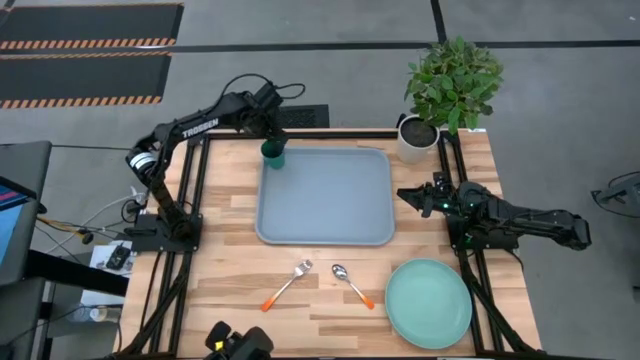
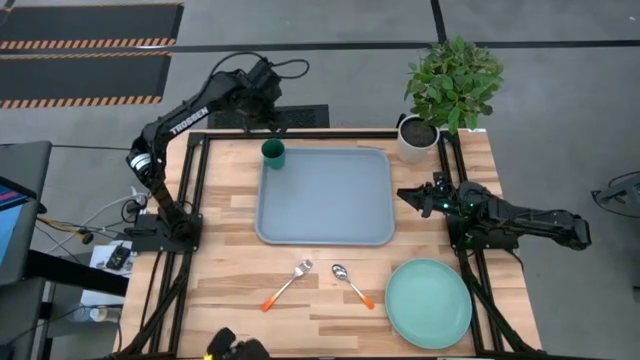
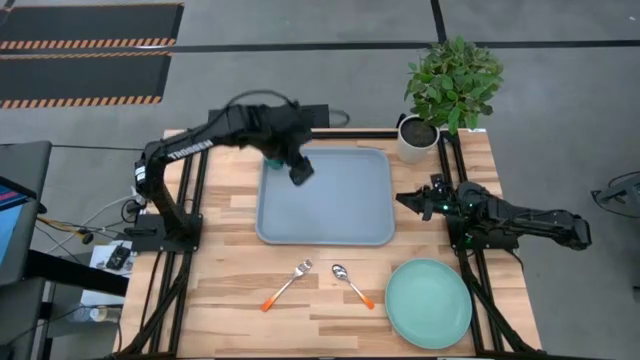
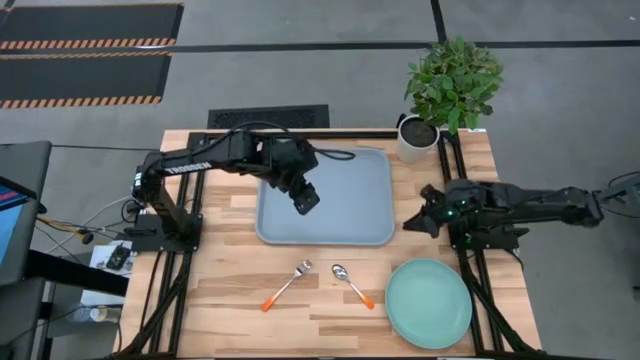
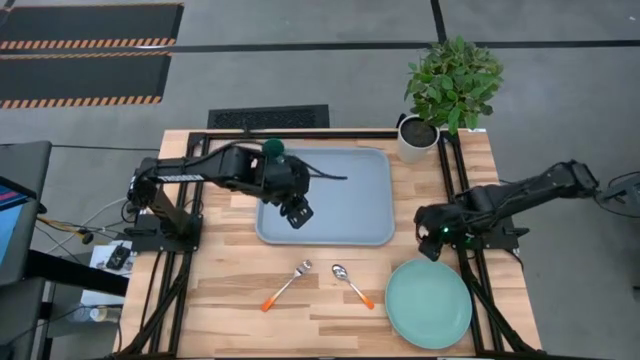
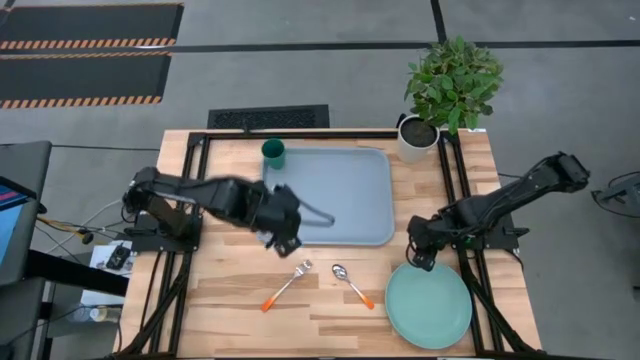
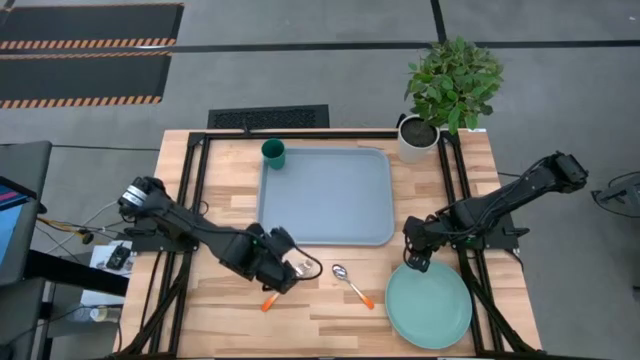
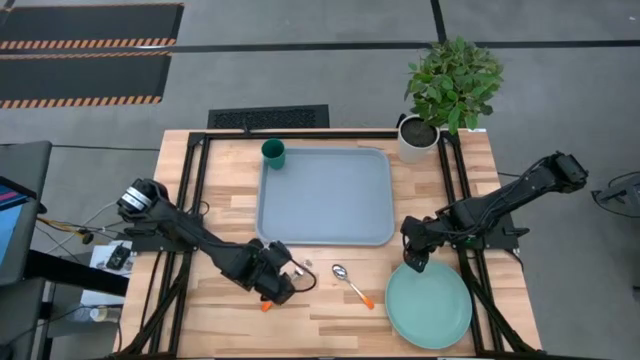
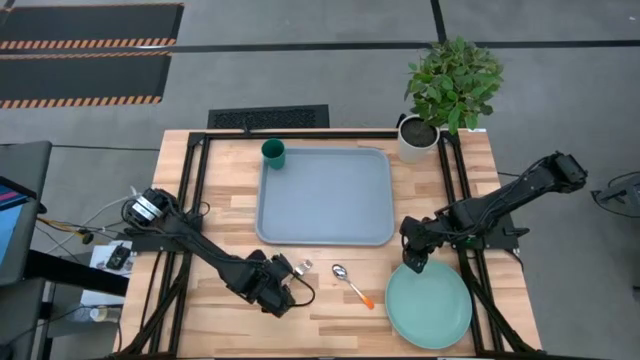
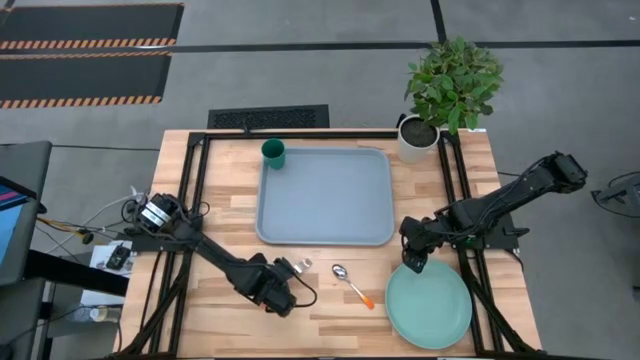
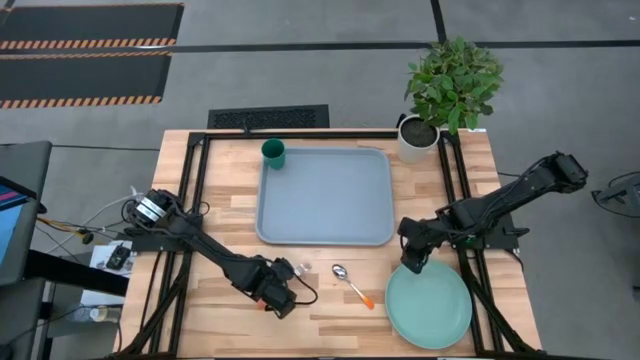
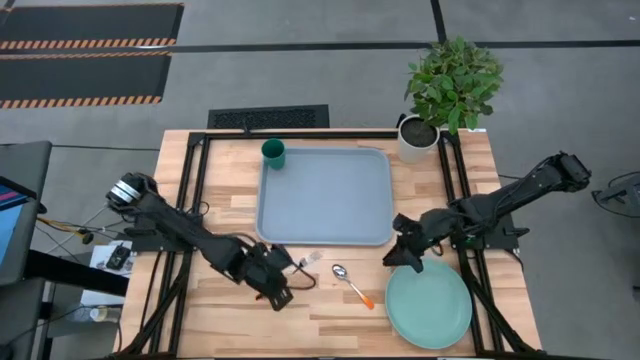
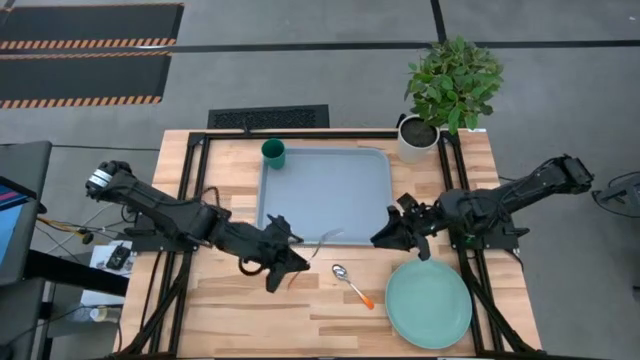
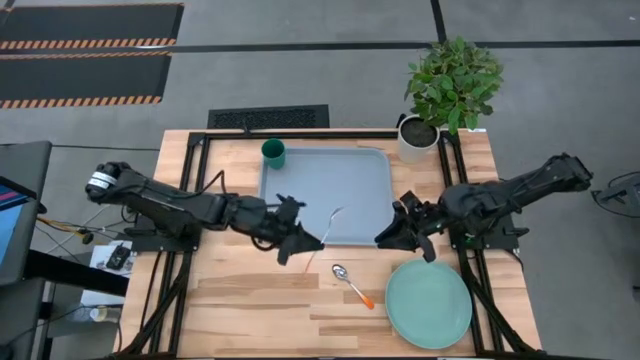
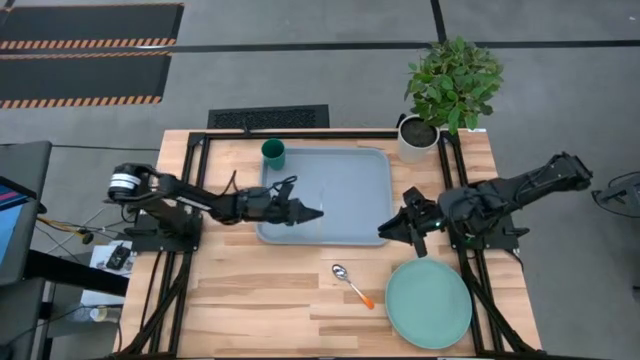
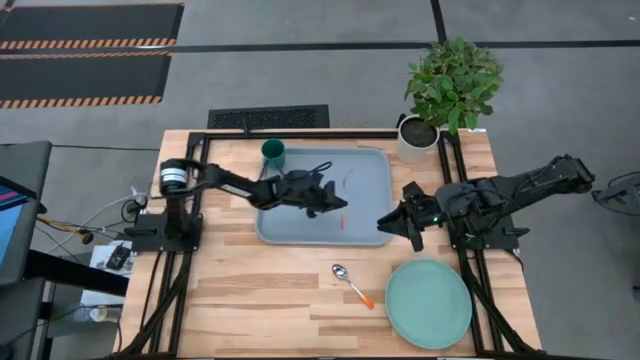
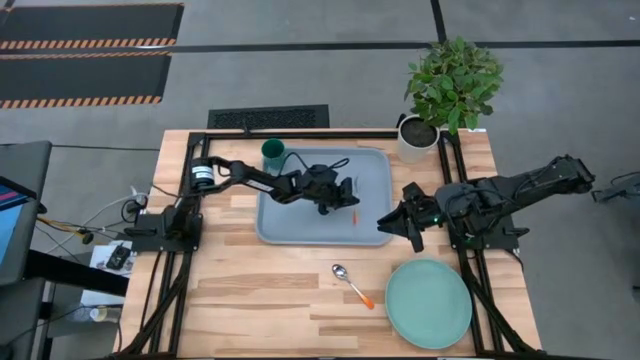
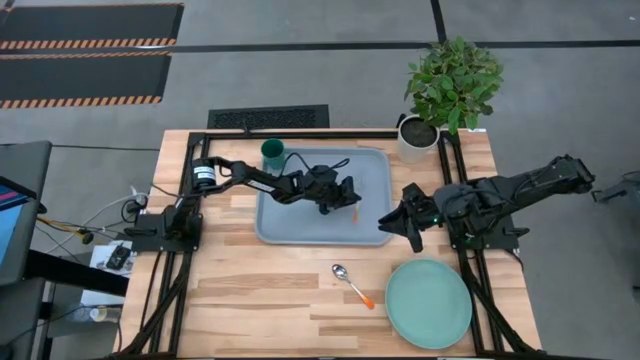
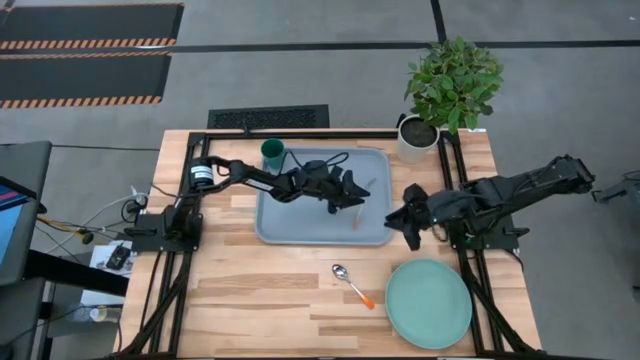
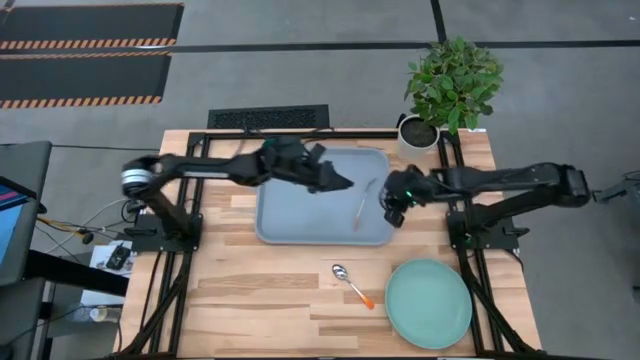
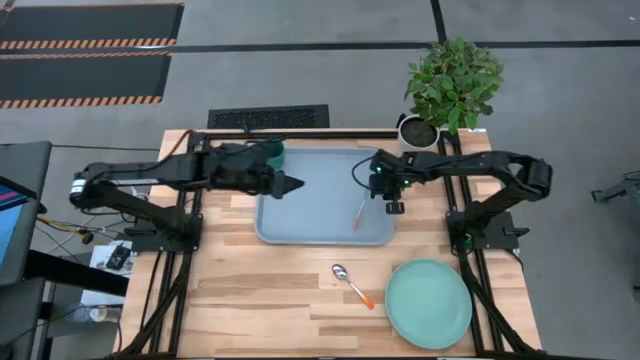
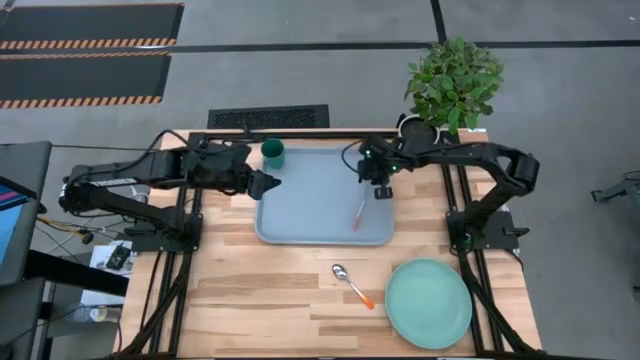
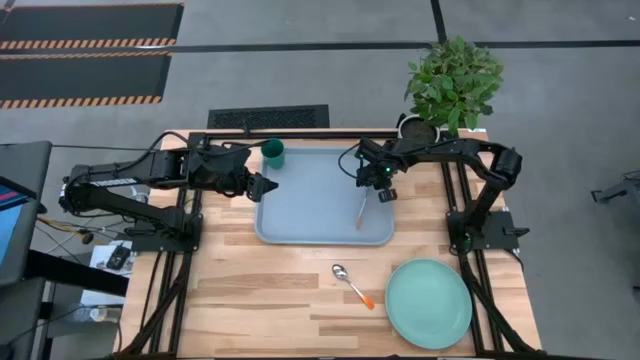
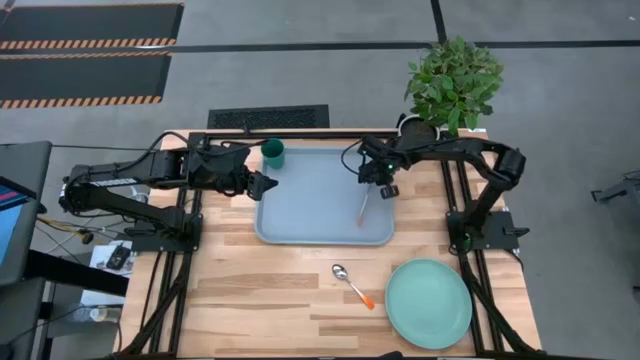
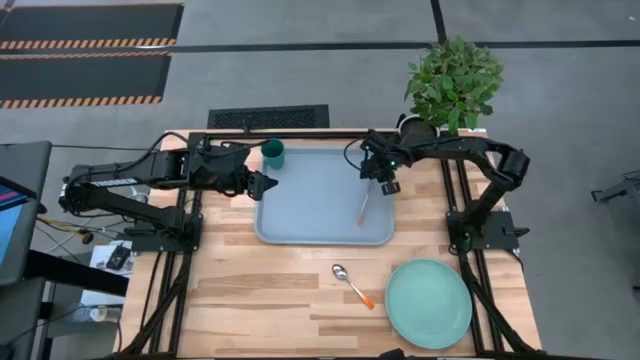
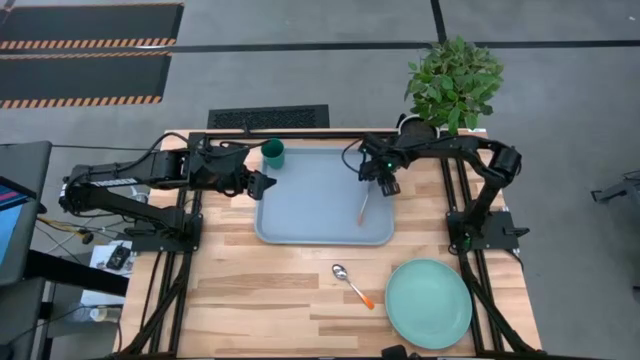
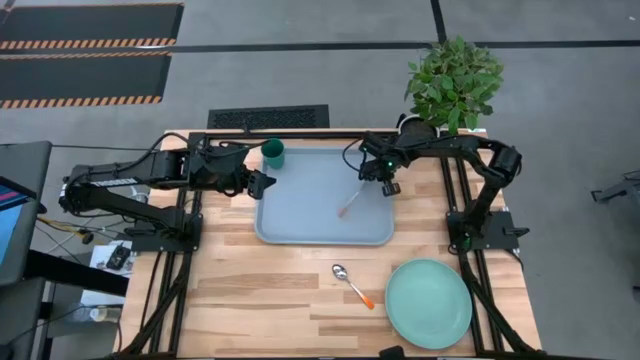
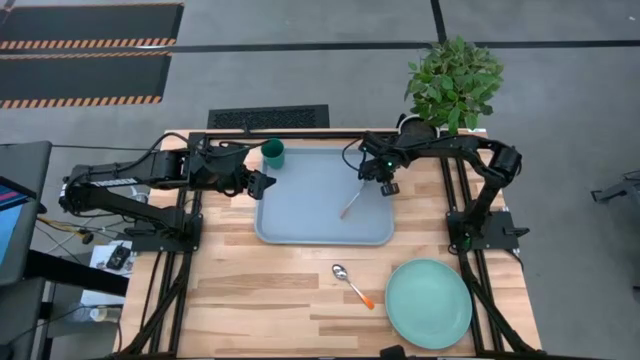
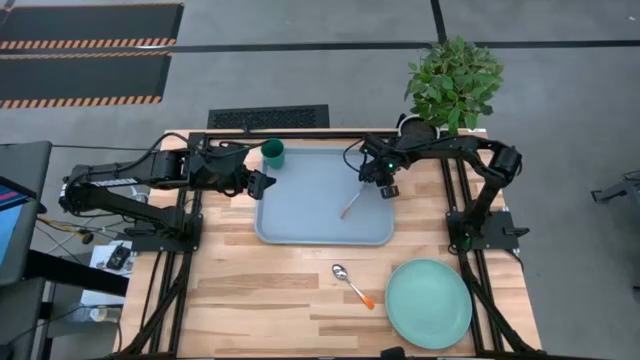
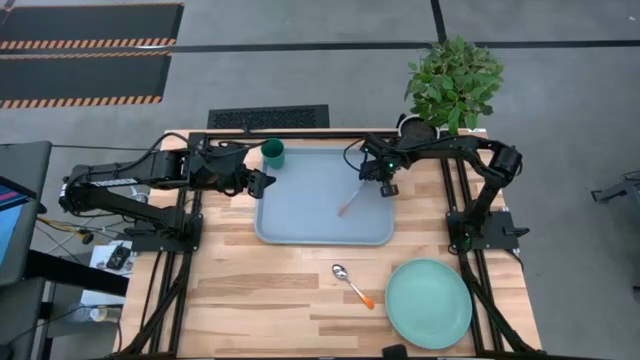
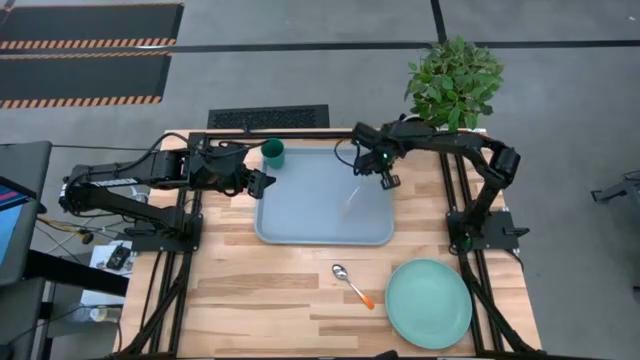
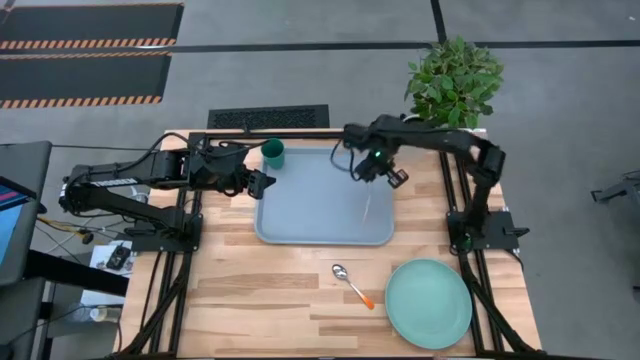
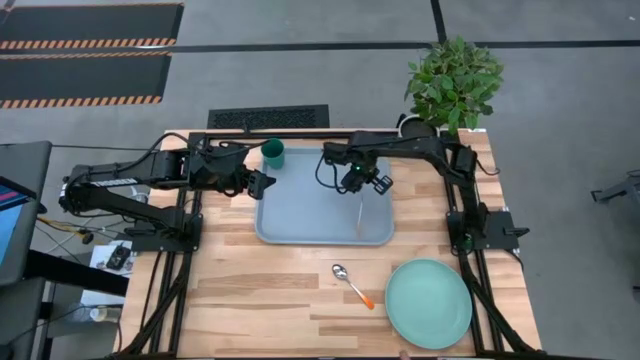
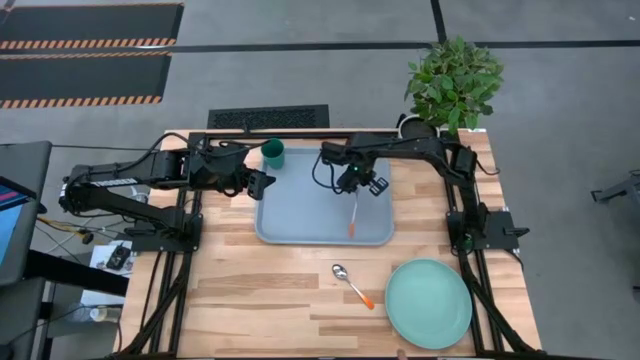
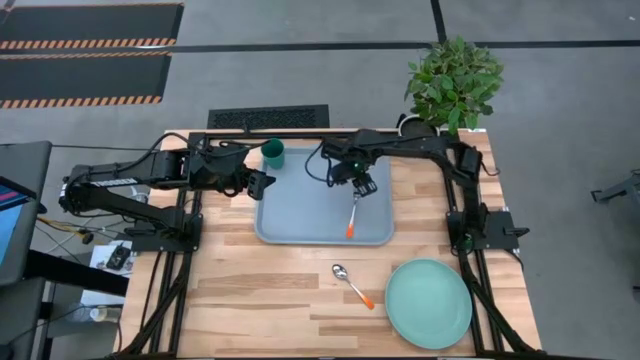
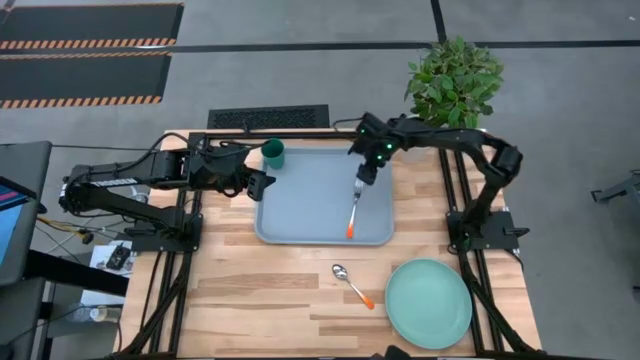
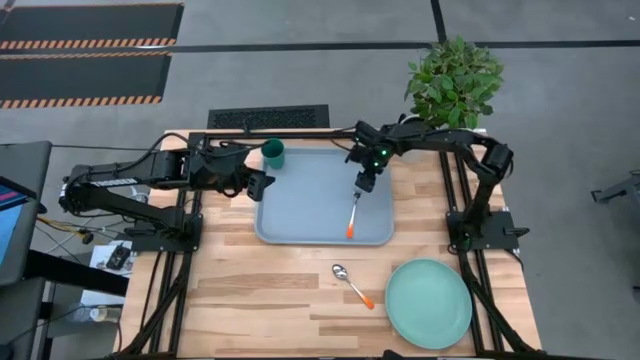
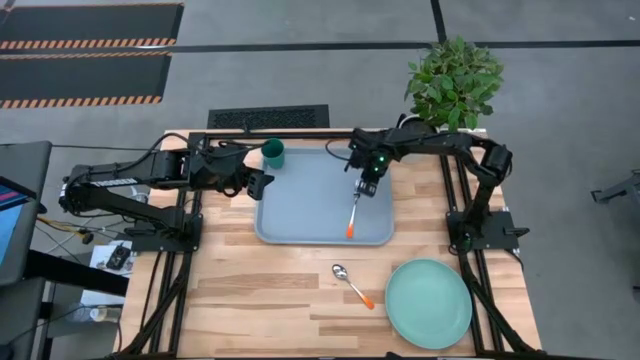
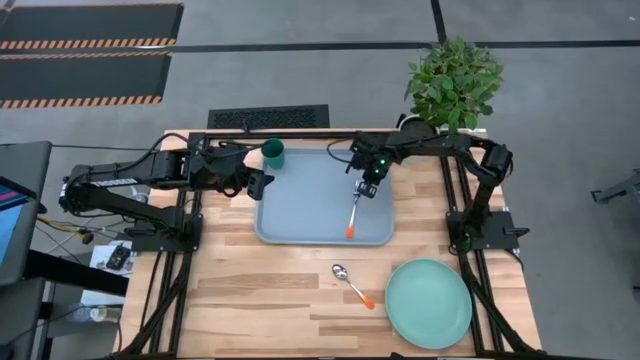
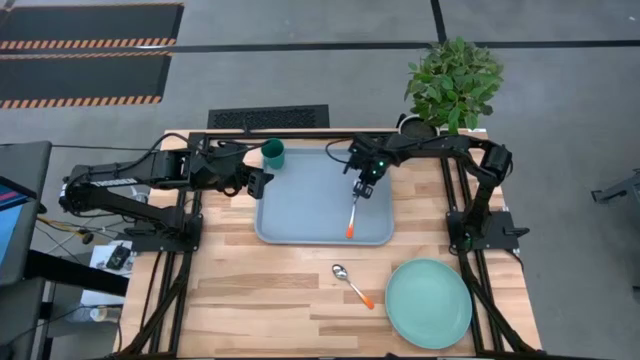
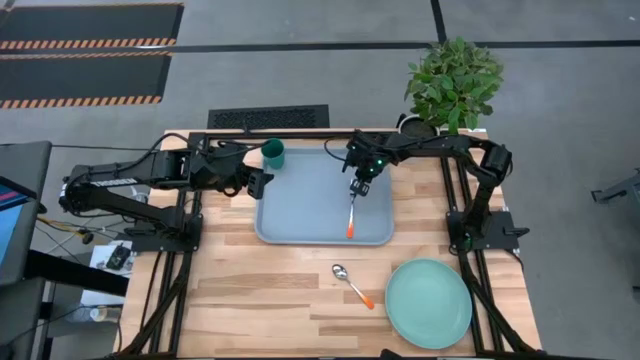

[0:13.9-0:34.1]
Task: Pick and place plate/cup/fork/spoon on tray
Put the orange fork on the gray tray
